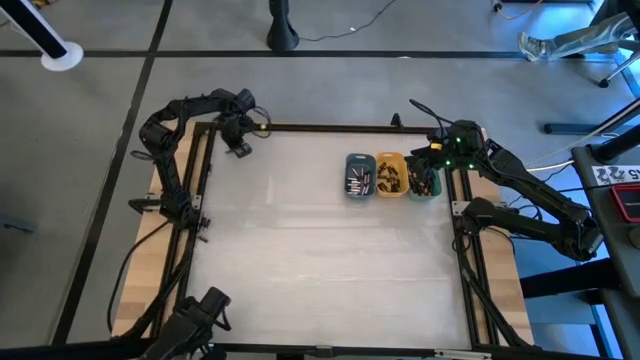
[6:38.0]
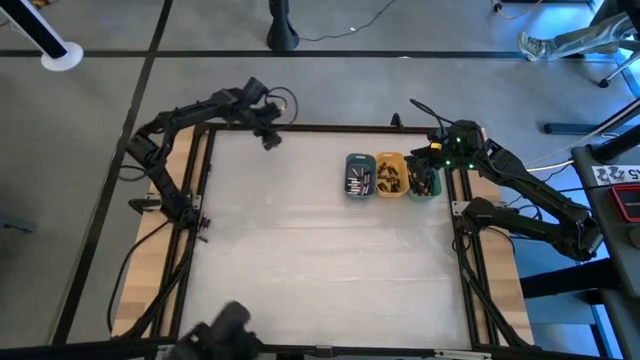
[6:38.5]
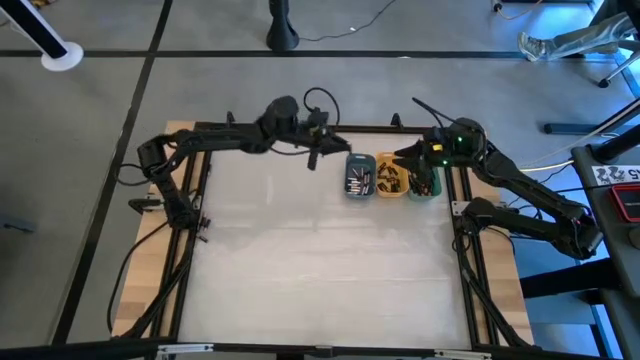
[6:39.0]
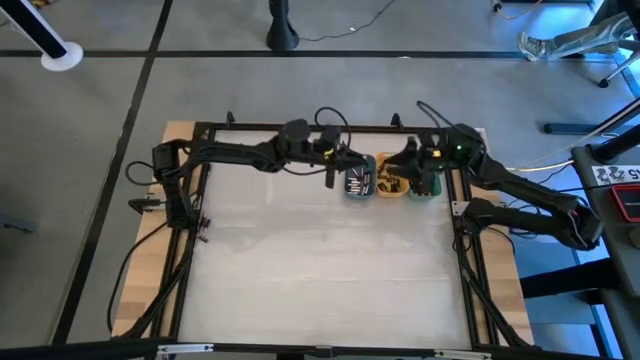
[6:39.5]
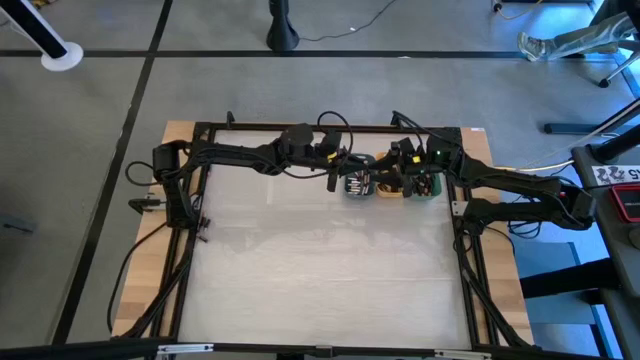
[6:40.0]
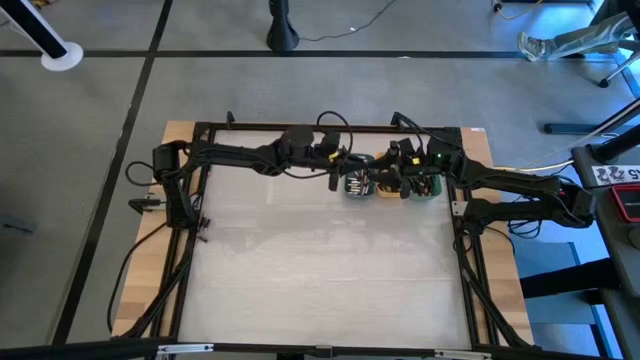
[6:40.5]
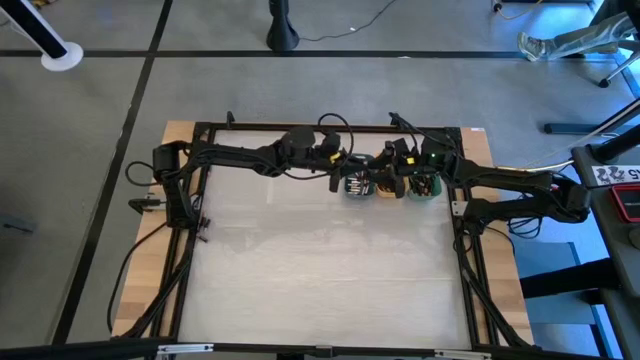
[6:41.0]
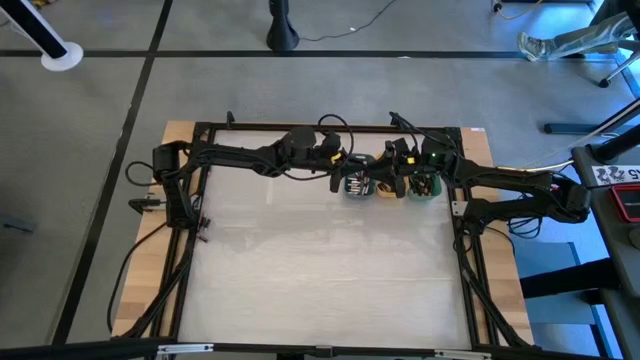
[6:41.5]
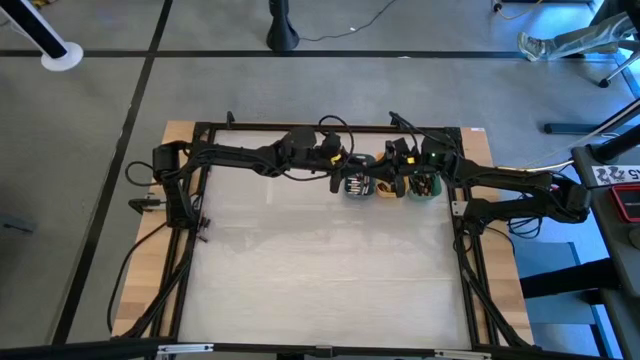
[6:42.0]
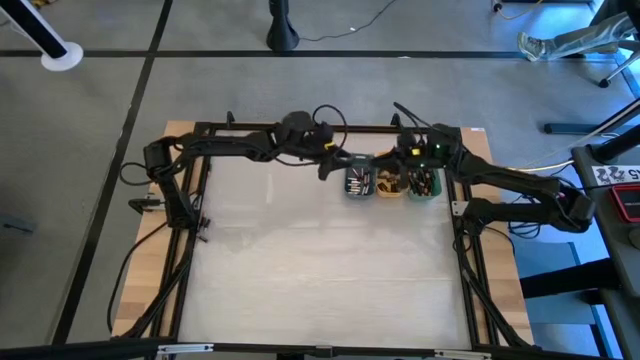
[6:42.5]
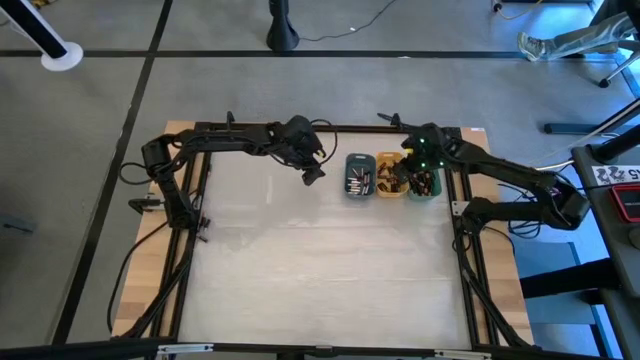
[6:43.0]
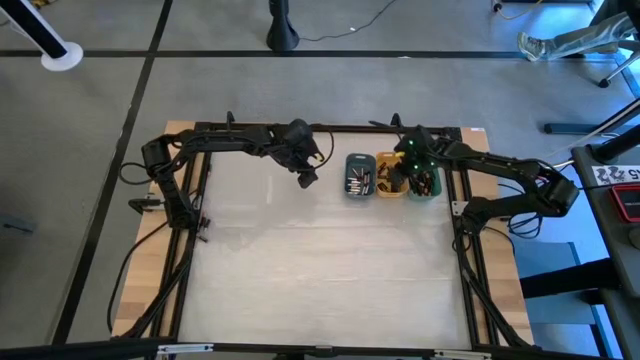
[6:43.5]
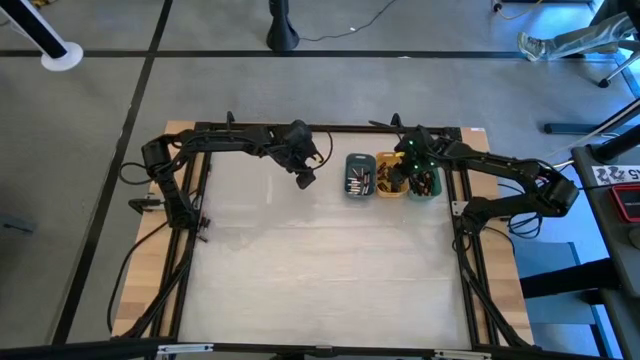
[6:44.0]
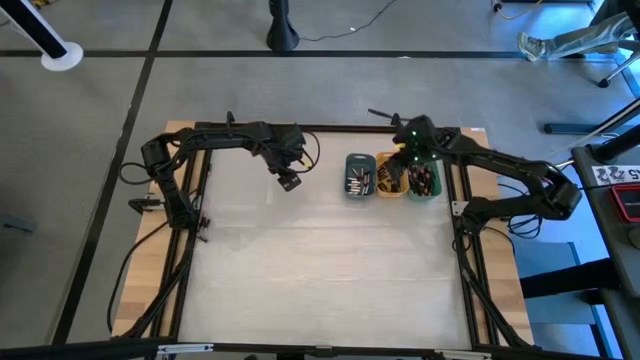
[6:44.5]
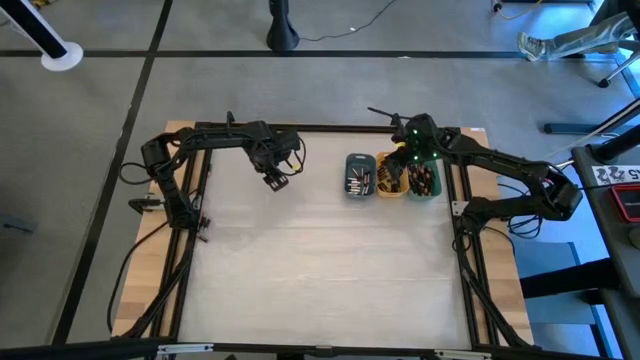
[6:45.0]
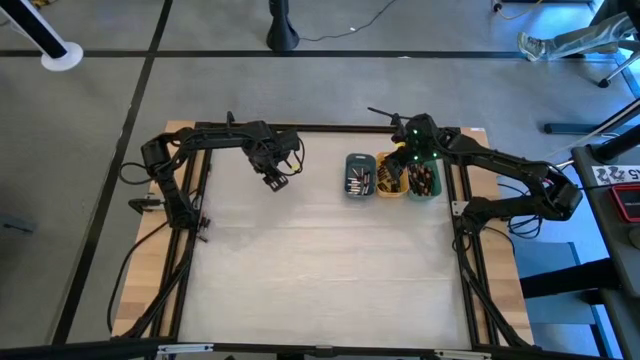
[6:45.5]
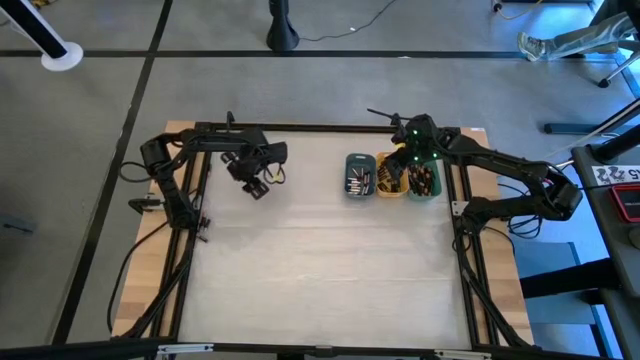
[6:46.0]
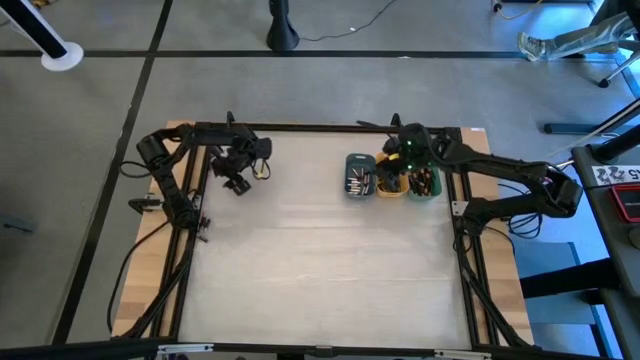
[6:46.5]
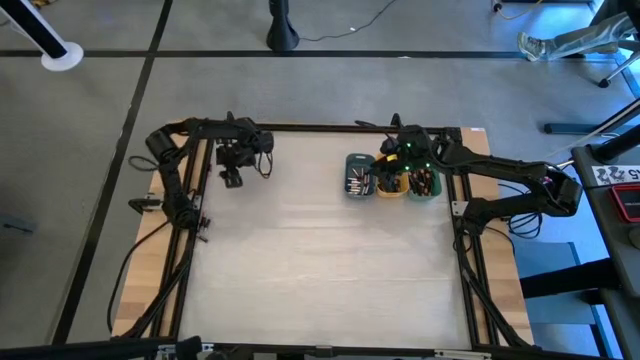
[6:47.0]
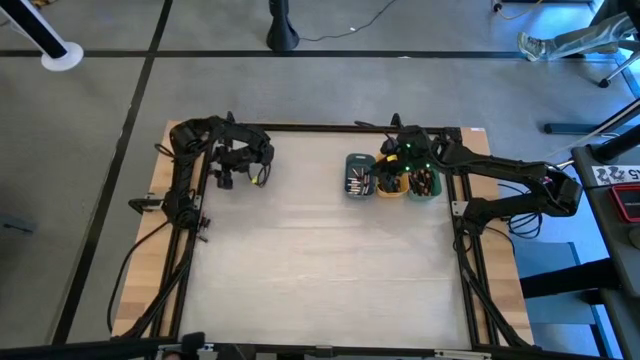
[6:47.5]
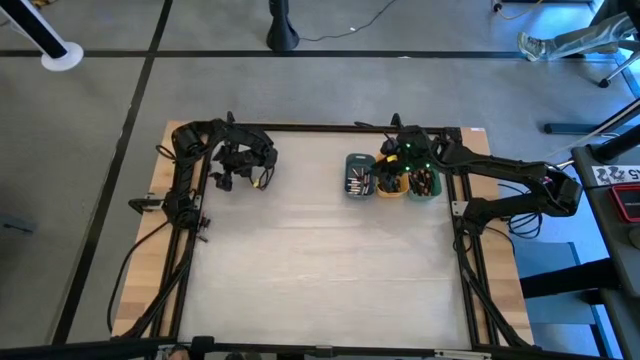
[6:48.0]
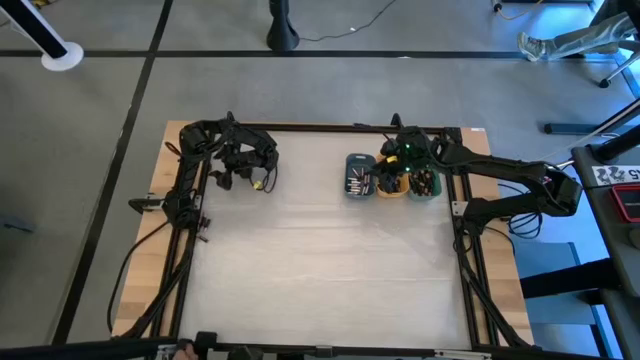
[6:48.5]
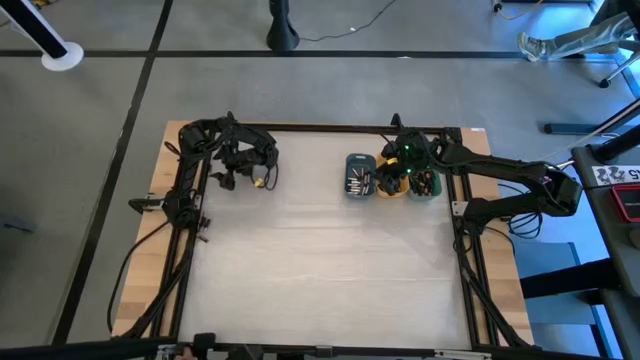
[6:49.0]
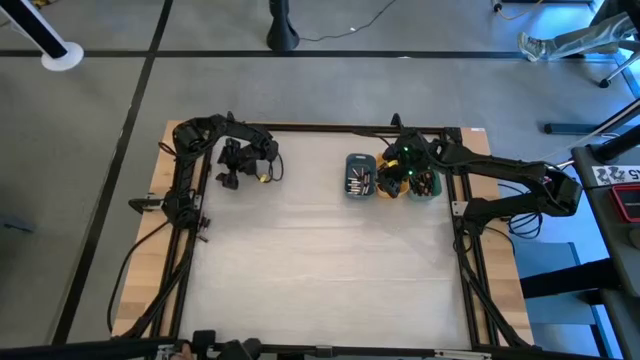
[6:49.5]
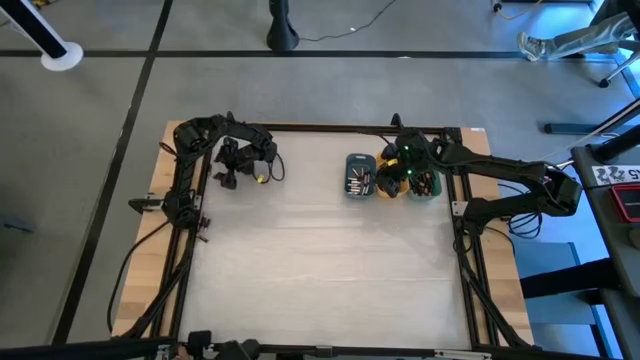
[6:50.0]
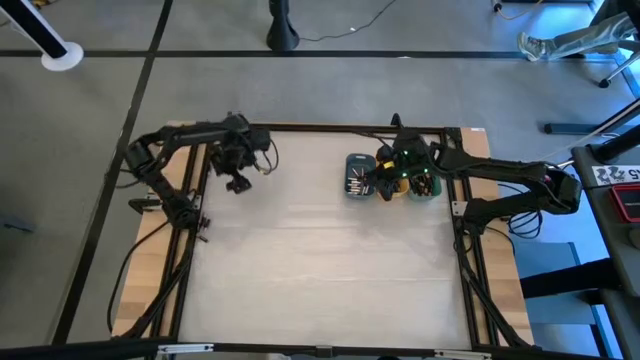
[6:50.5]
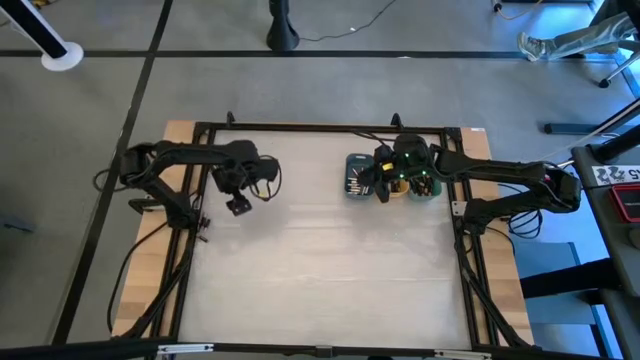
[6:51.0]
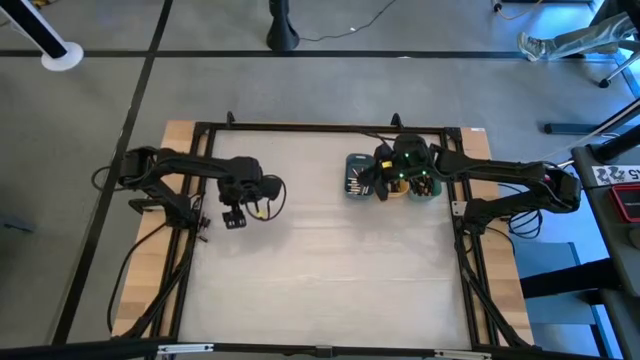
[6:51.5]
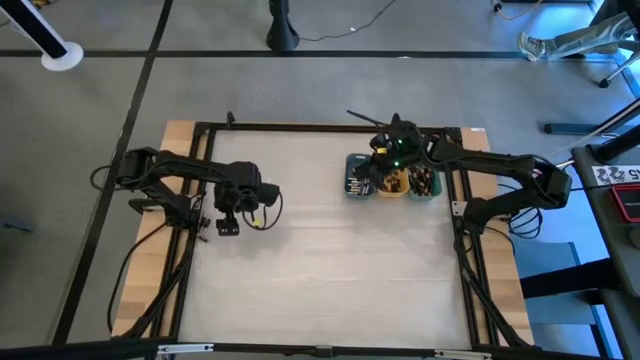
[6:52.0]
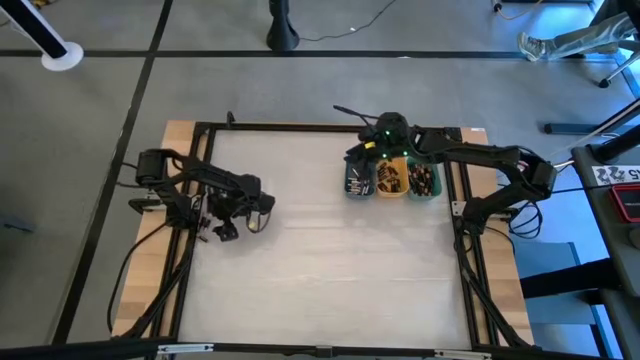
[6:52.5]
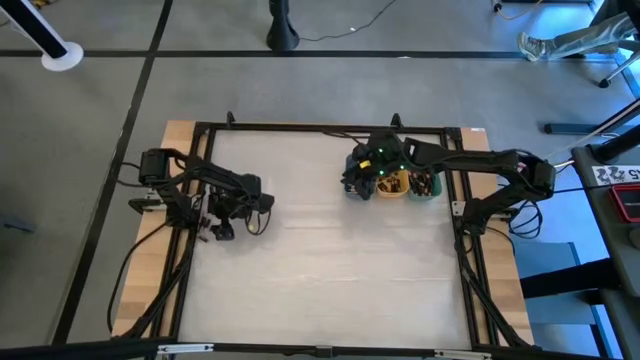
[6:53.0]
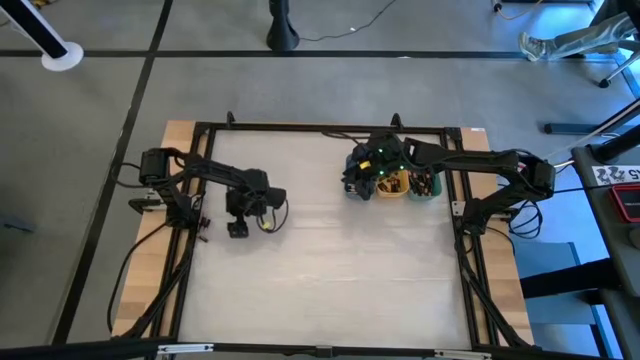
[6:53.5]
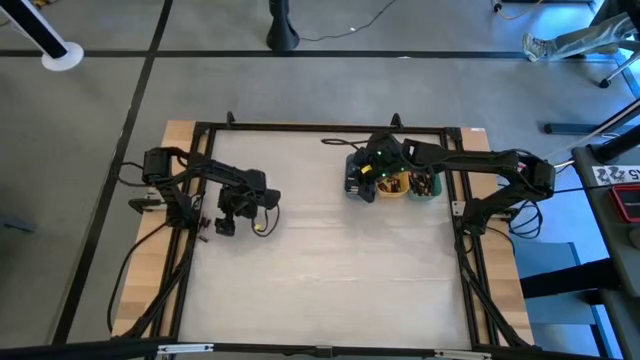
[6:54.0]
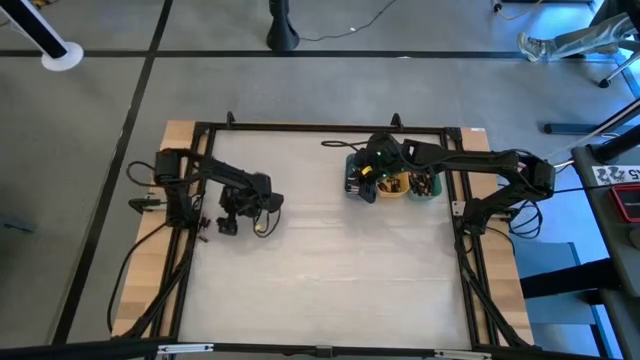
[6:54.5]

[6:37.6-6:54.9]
Task: Sort batteries
Put the black into the yellow bin

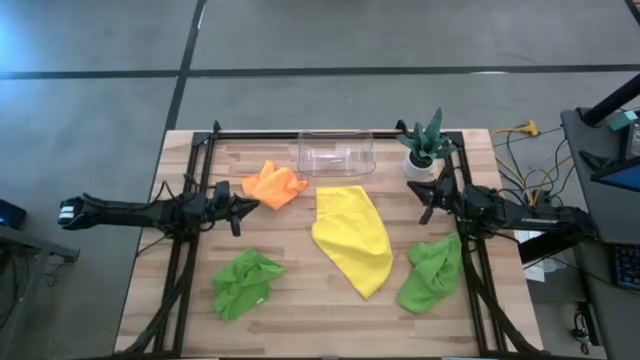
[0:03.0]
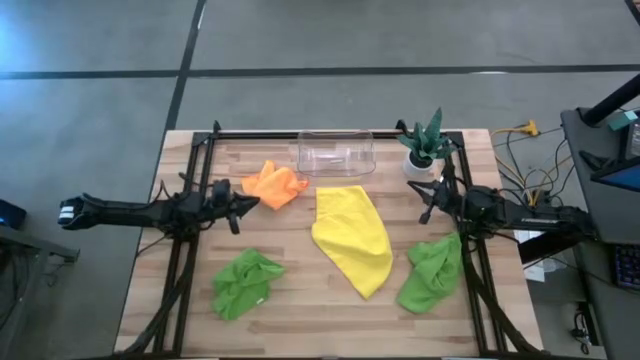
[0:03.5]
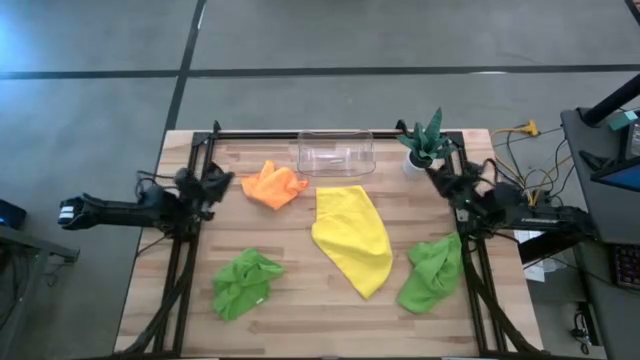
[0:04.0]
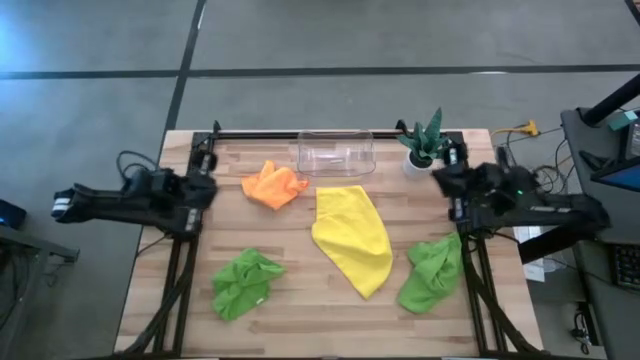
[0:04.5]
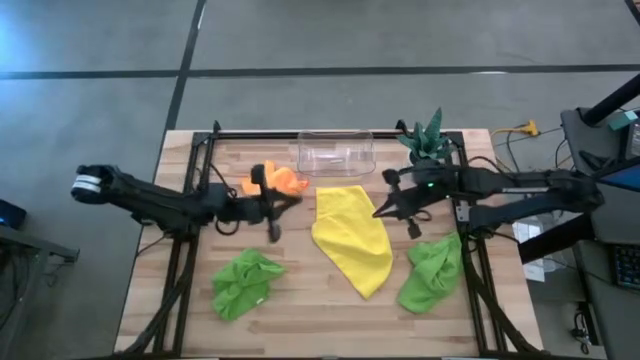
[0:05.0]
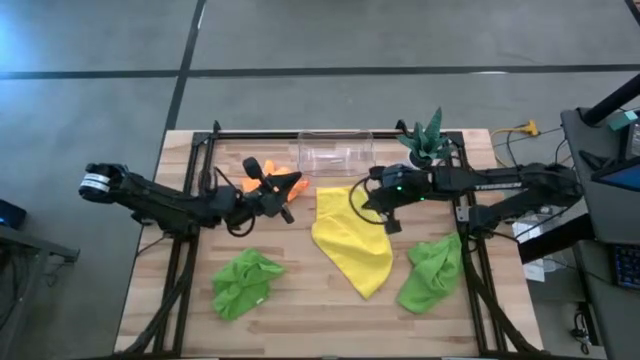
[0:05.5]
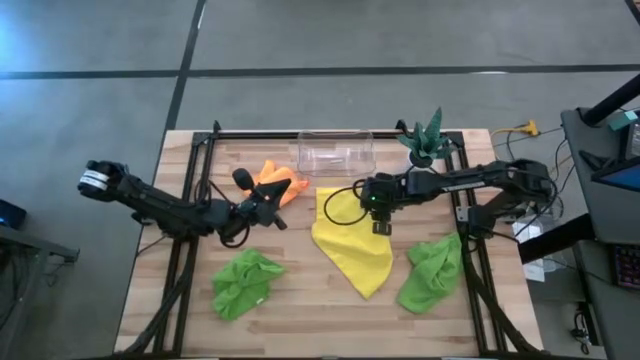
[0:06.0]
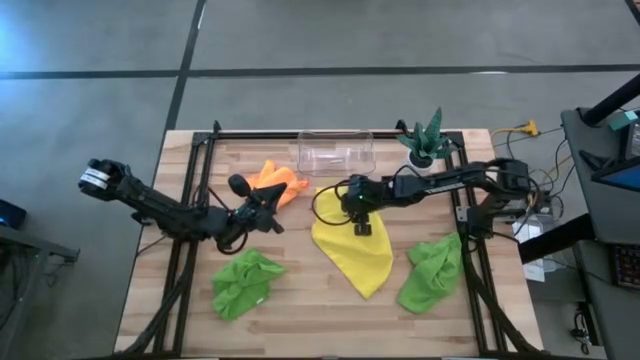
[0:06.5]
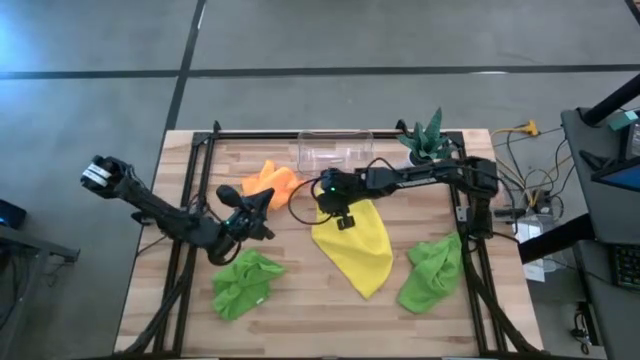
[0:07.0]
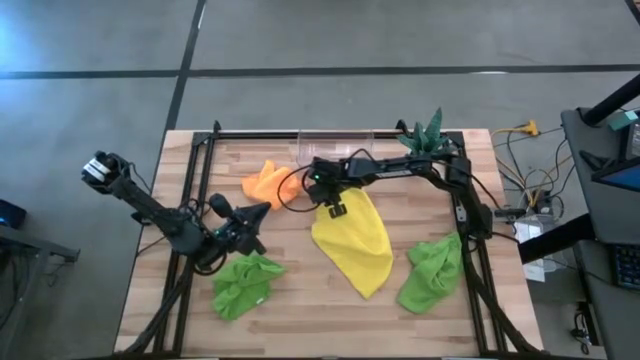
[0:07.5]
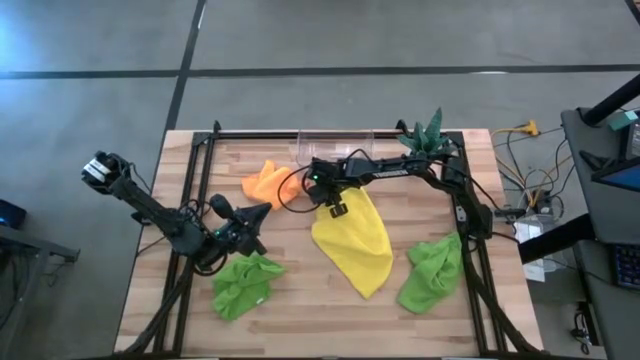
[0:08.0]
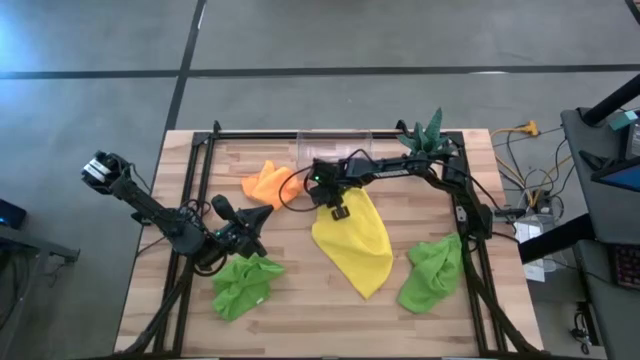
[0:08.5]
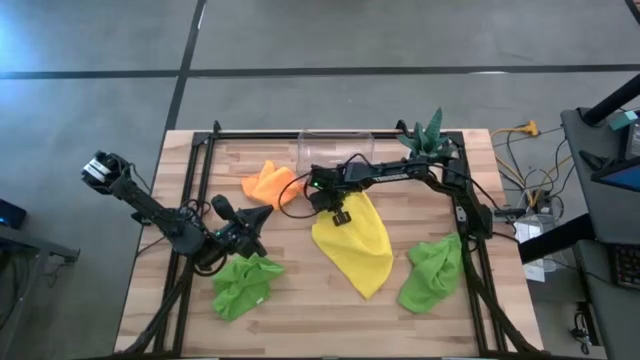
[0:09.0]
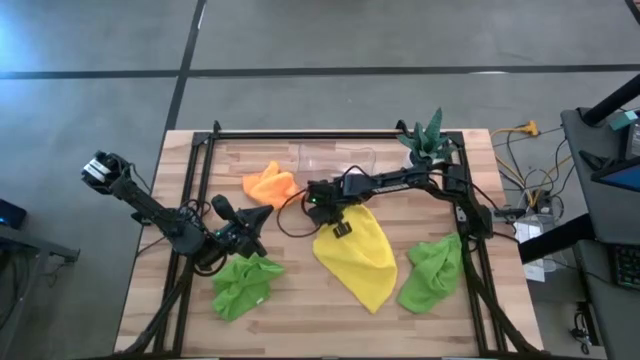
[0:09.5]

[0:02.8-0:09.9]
Task: Fold microfiber towels
Fold the yellow microfiber towel
